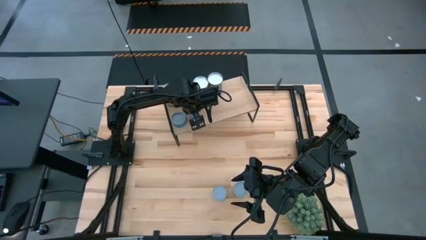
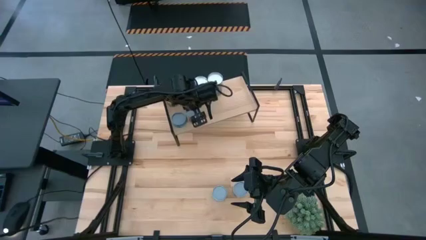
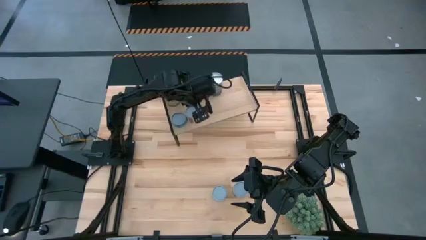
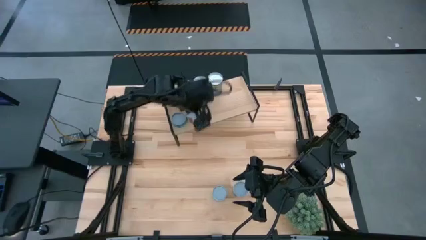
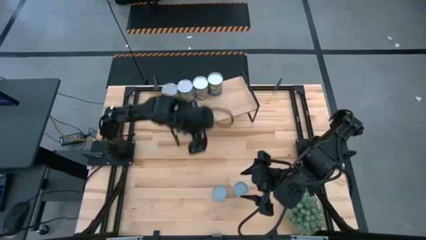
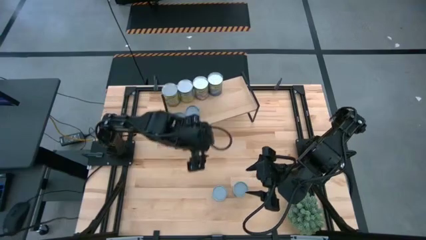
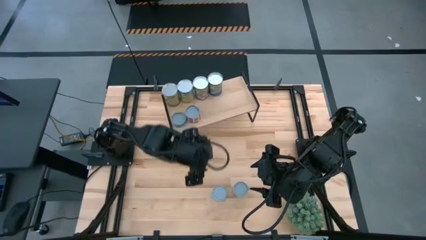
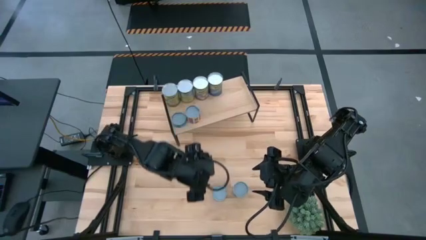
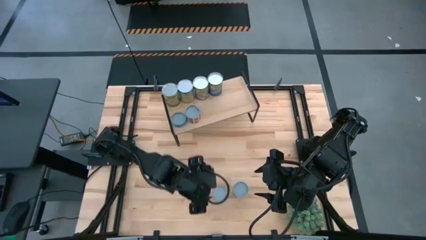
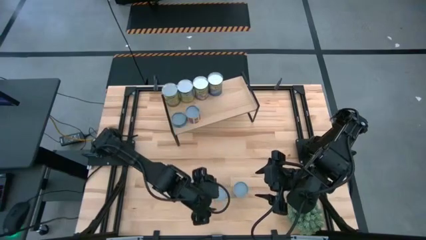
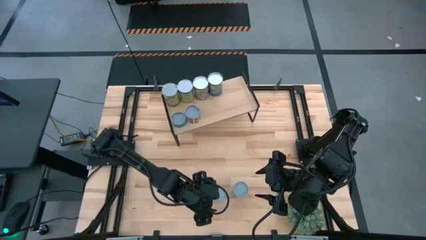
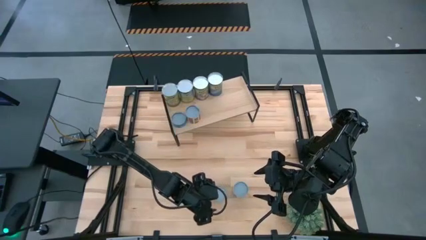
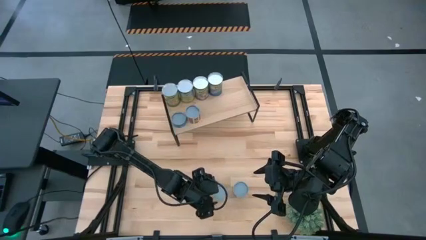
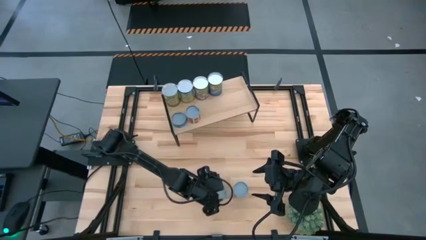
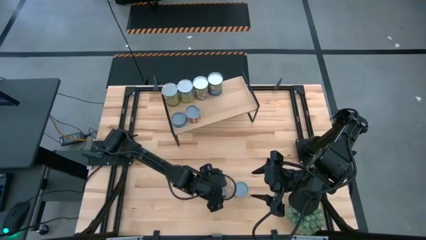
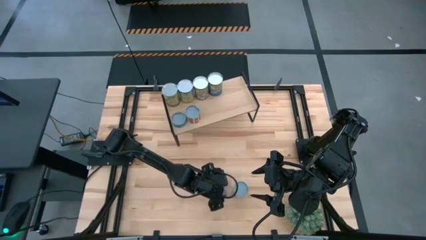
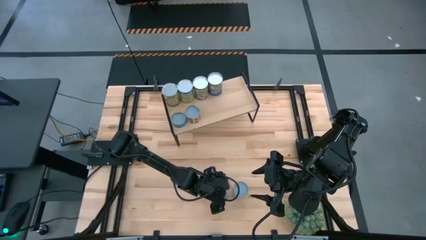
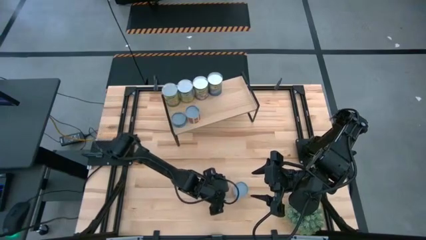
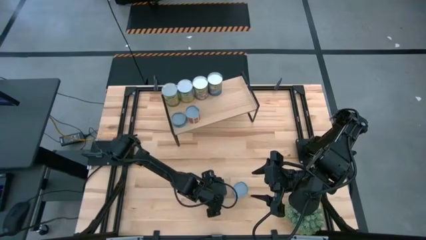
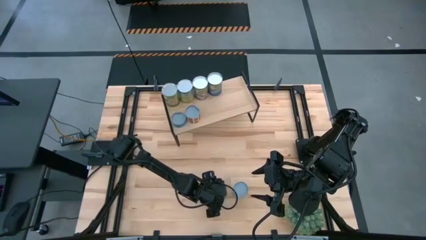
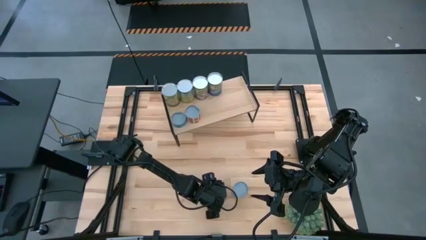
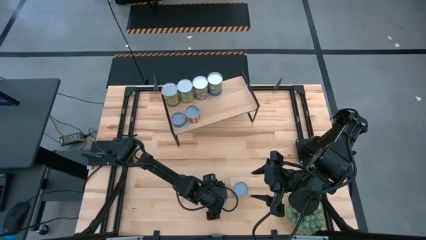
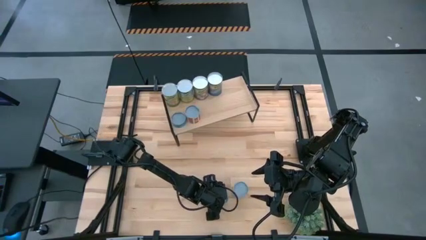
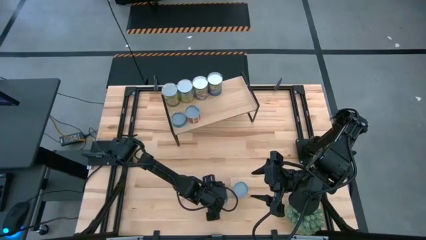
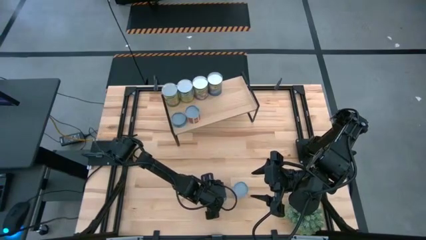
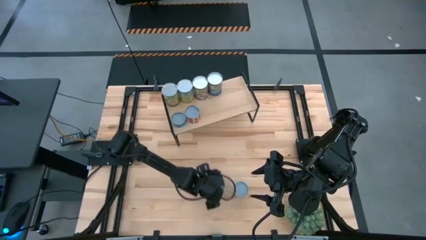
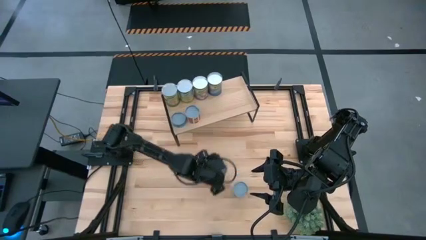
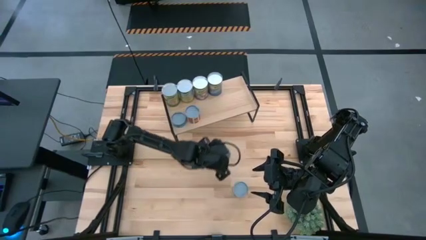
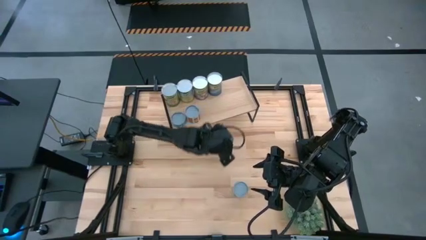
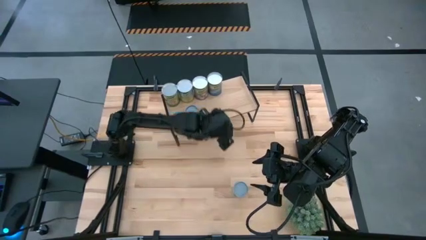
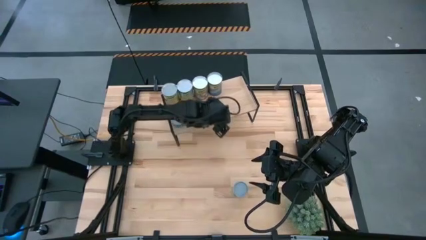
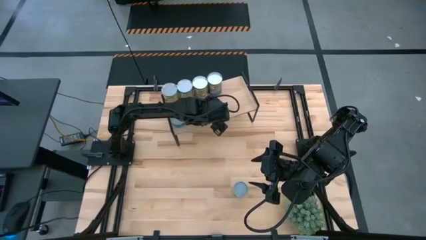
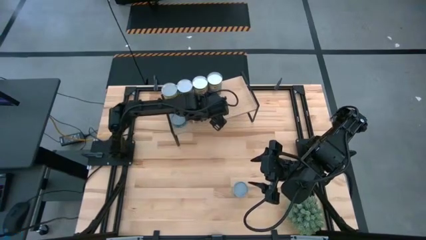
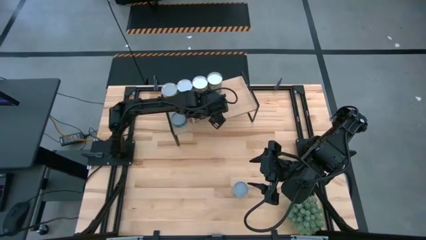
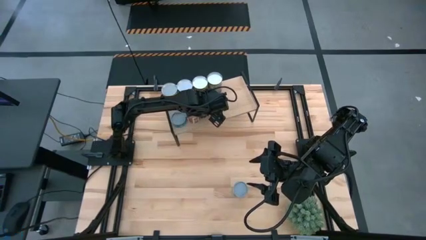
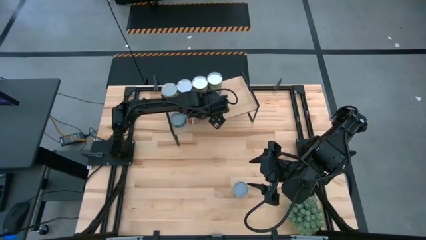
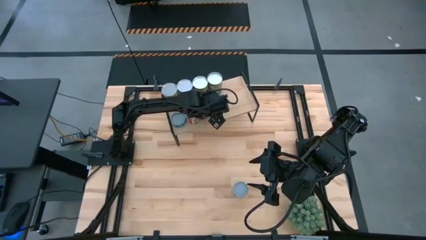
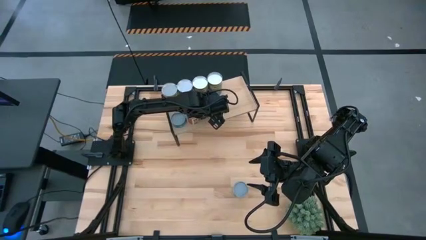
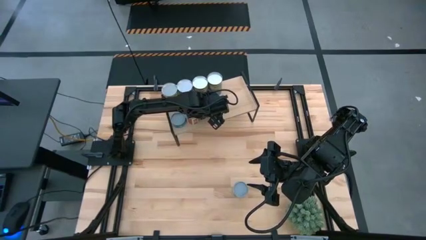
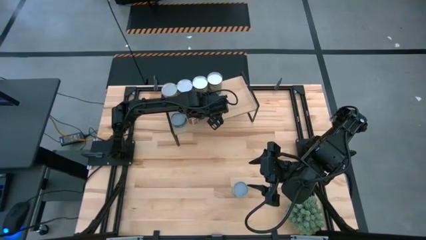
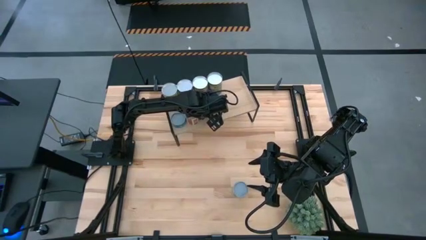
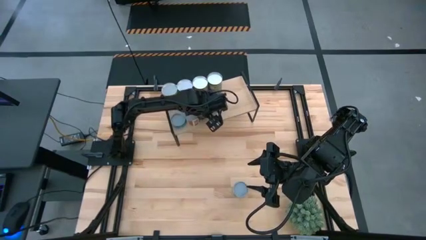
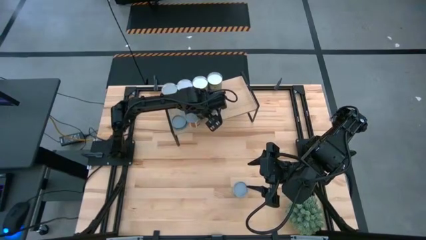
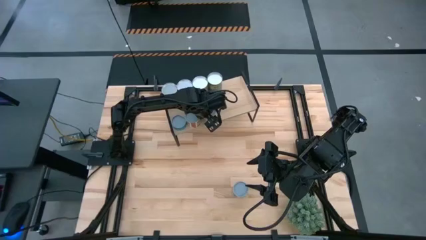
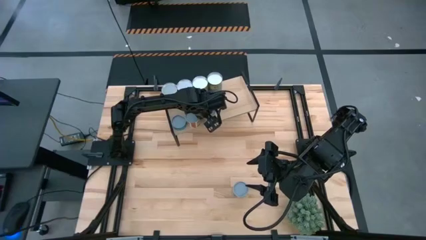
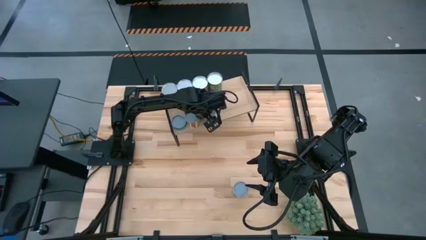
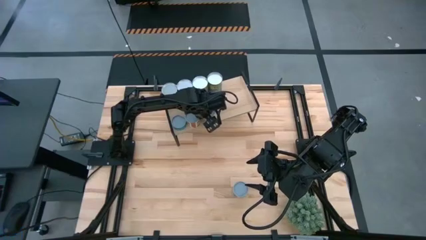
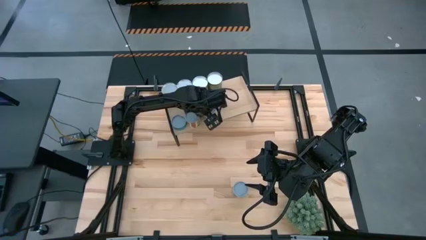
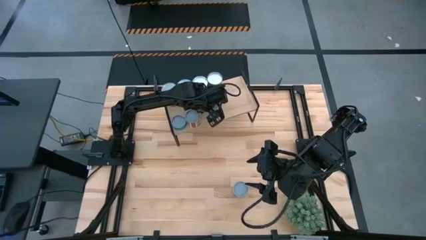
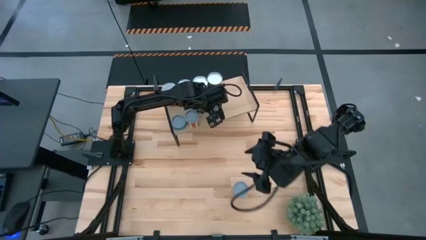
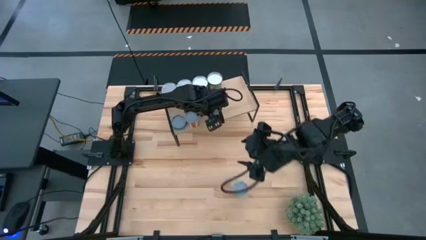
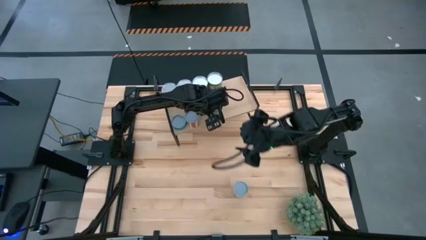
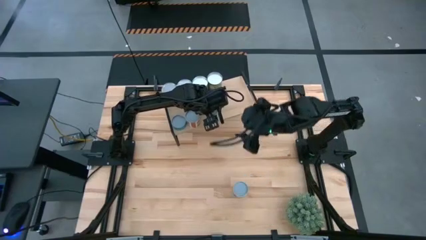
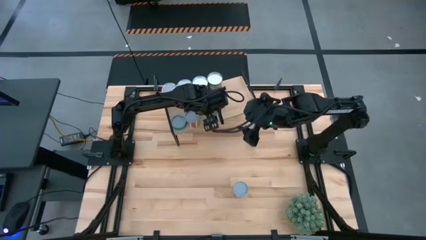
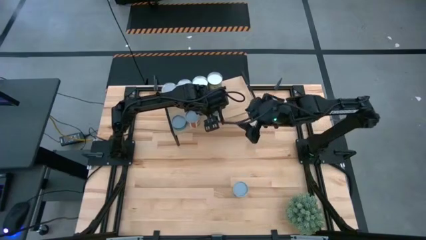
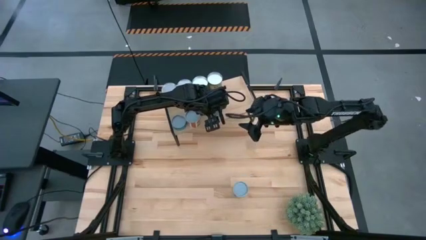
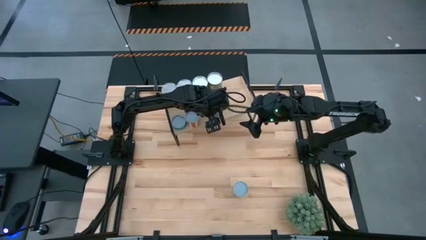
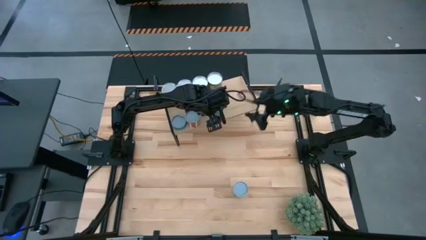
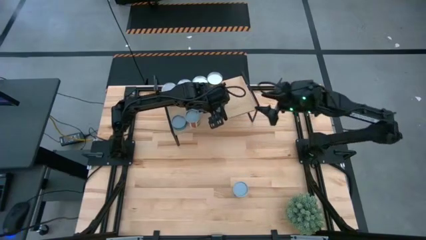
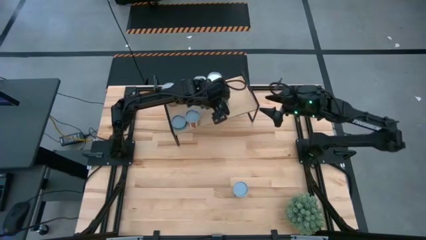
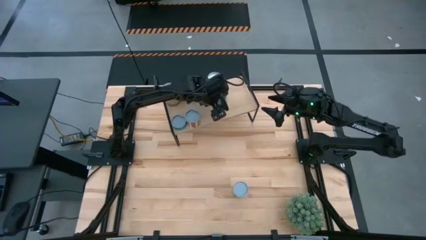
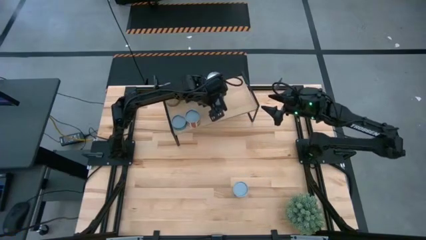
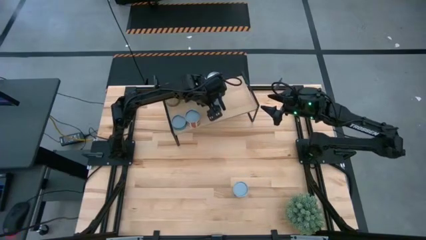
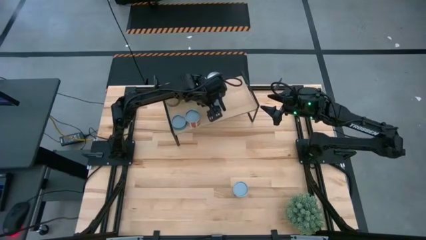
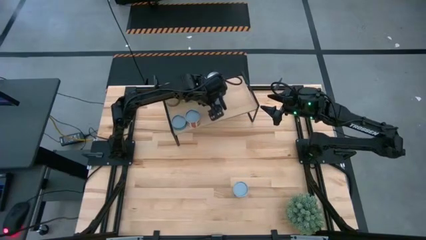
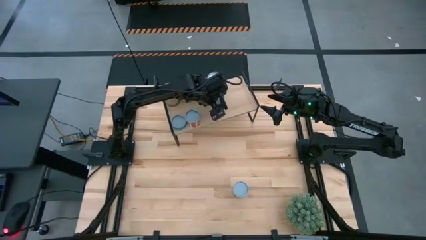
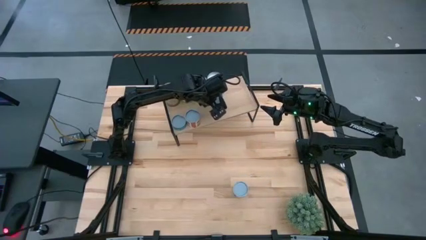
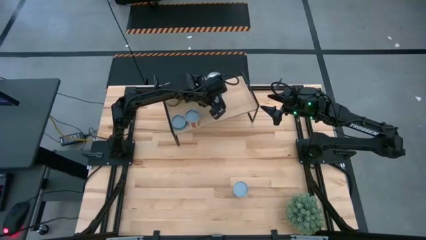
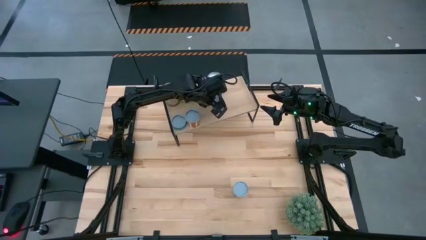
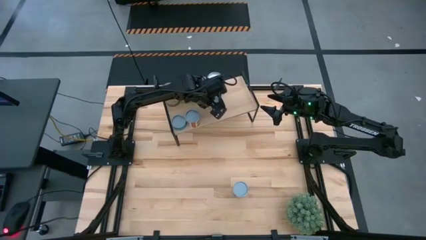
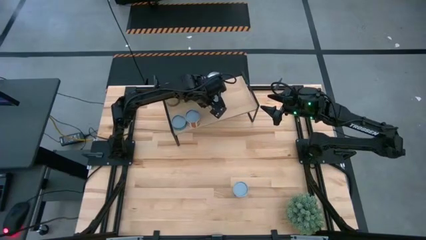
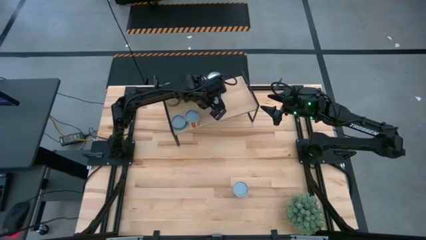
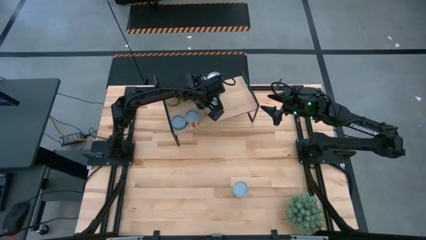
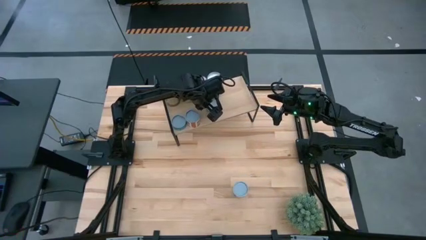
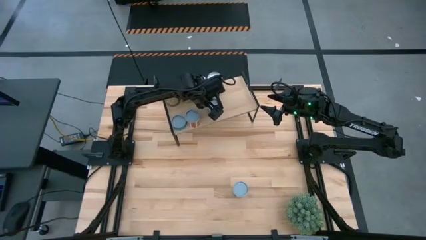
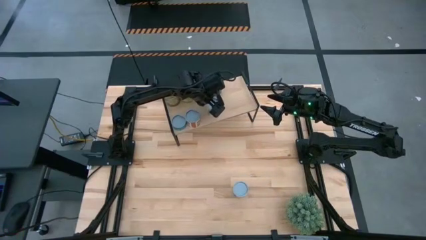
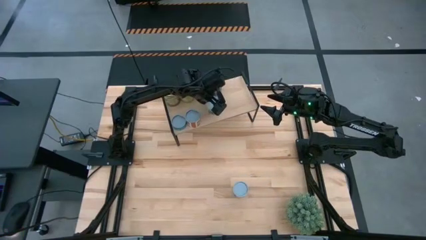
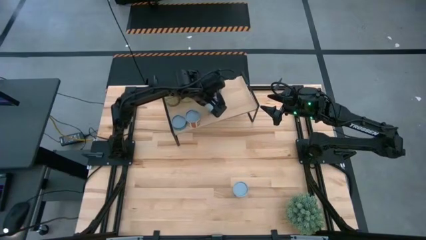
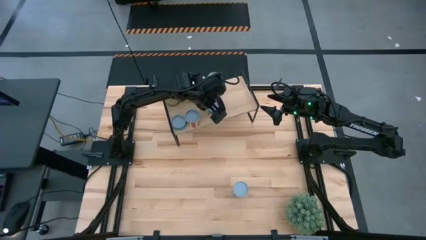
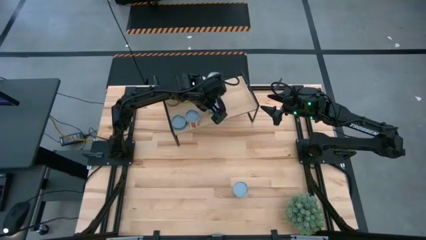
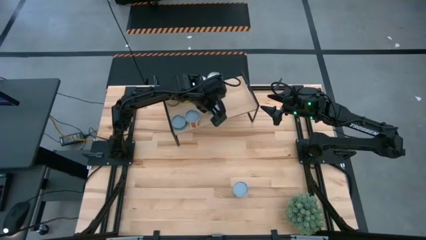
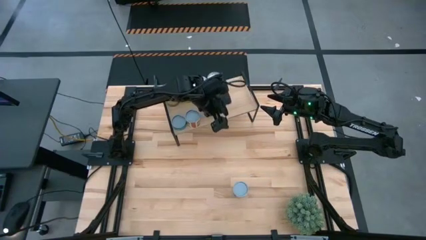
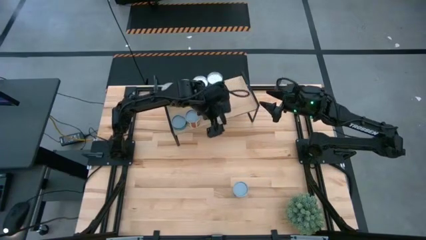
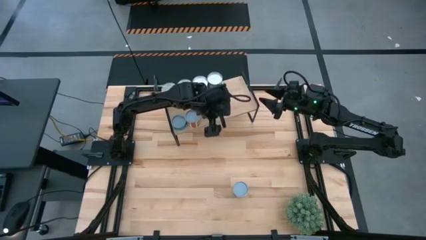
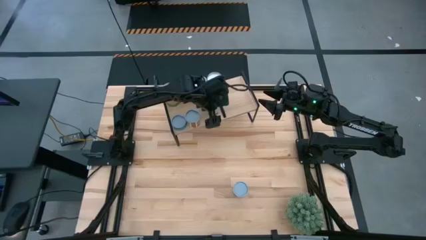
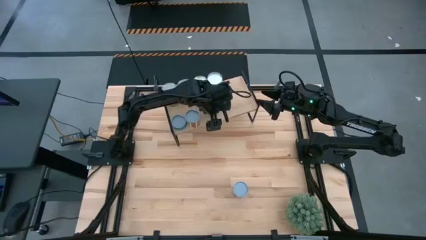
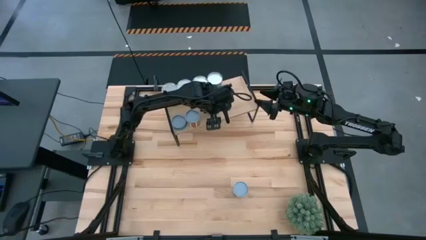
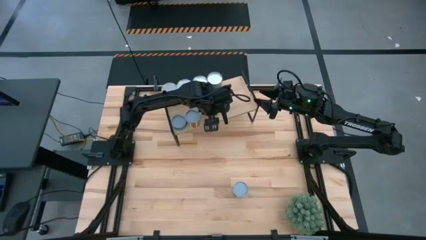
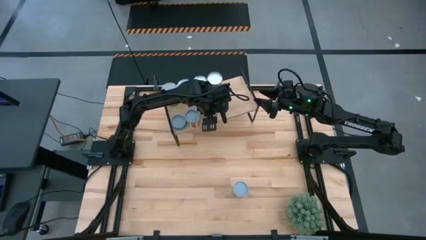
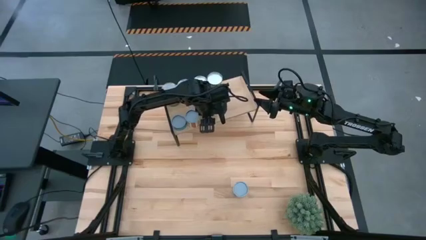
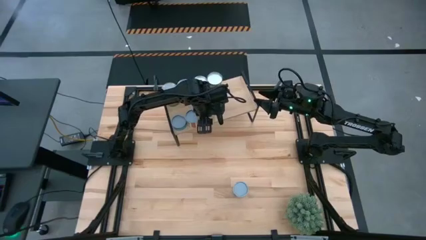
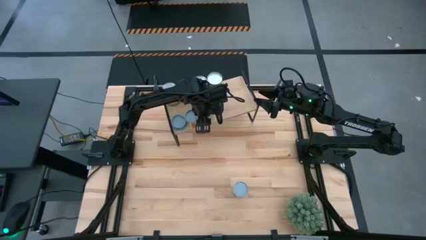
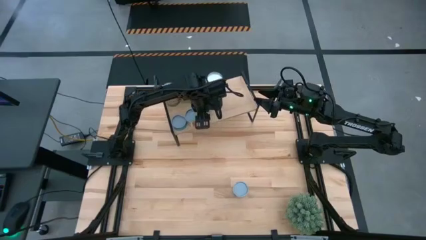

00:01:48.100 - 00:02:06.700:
Task: Pick and place cans onto a shelf
Put the canned green peas on the shelf
